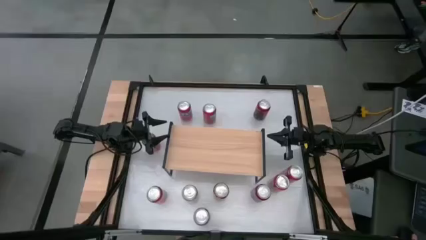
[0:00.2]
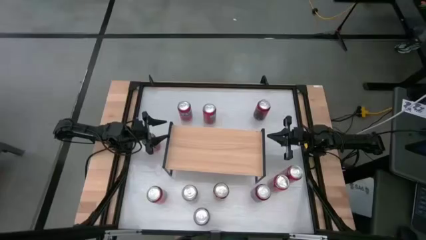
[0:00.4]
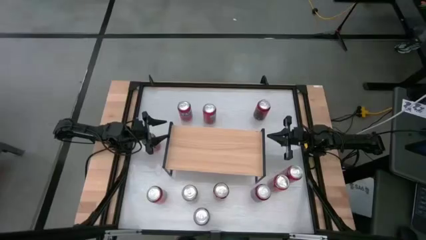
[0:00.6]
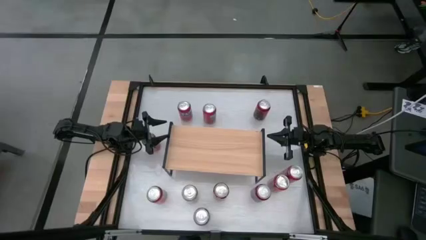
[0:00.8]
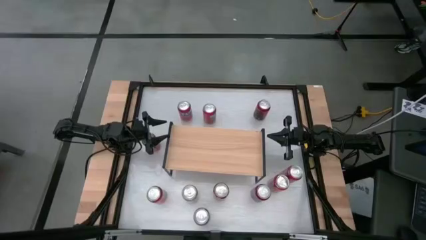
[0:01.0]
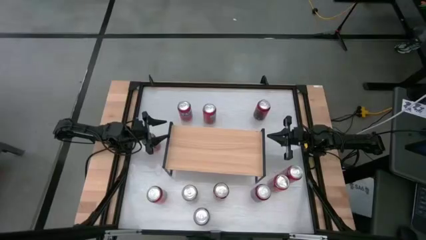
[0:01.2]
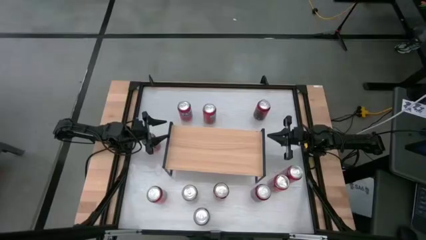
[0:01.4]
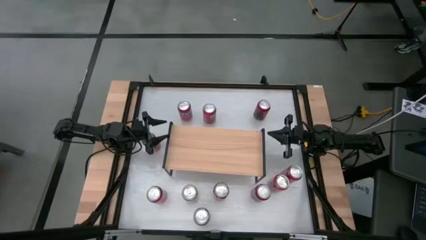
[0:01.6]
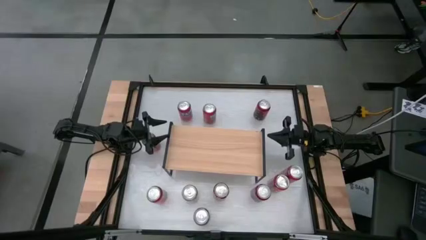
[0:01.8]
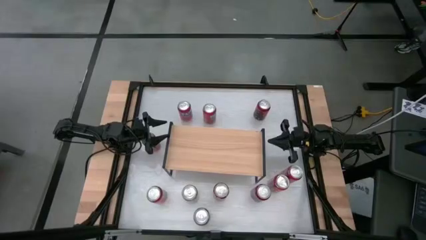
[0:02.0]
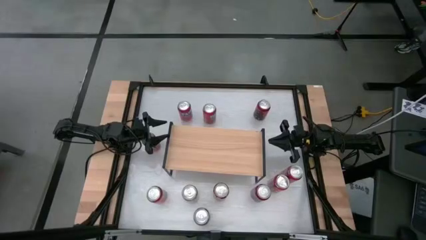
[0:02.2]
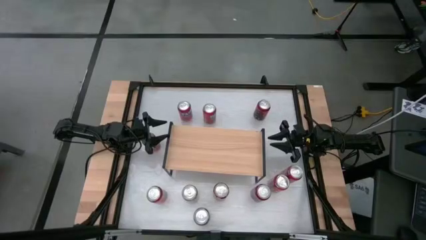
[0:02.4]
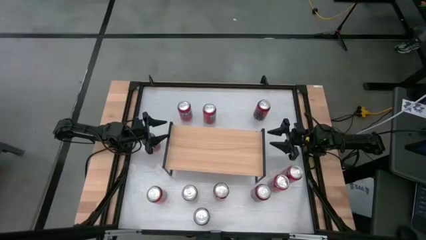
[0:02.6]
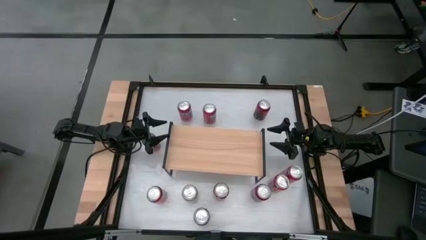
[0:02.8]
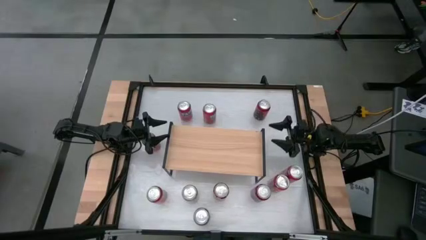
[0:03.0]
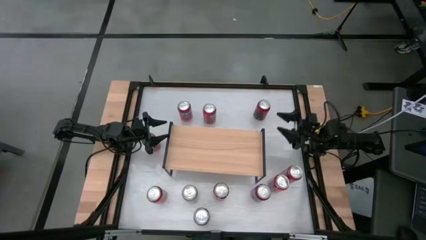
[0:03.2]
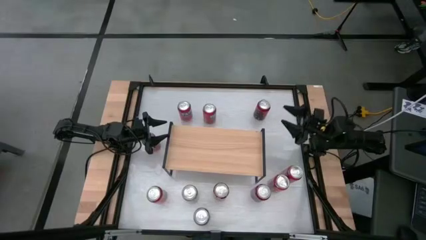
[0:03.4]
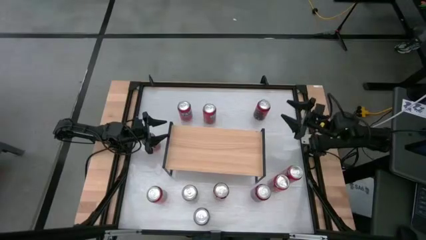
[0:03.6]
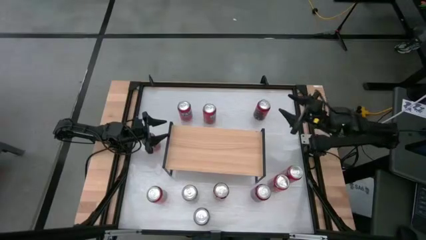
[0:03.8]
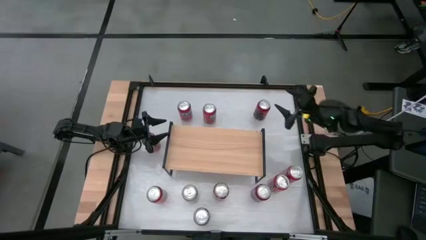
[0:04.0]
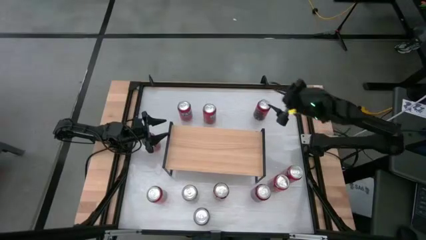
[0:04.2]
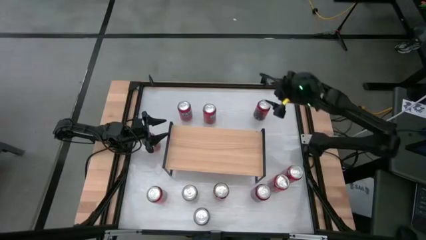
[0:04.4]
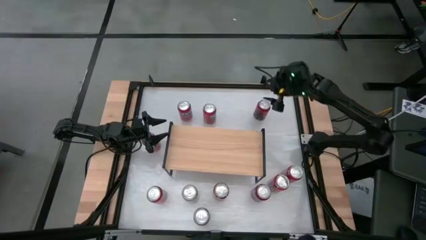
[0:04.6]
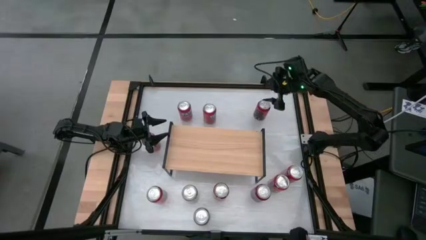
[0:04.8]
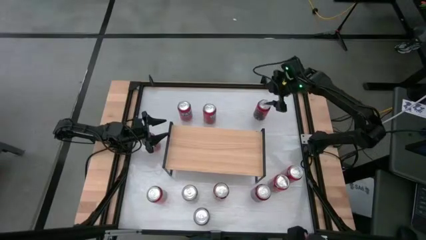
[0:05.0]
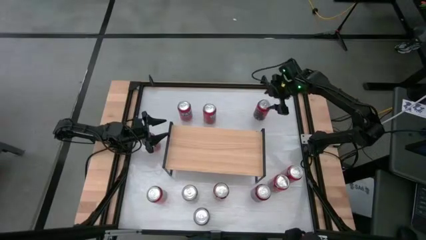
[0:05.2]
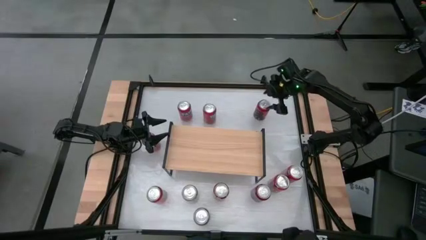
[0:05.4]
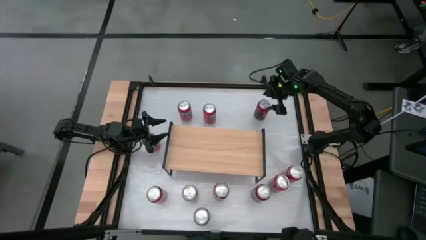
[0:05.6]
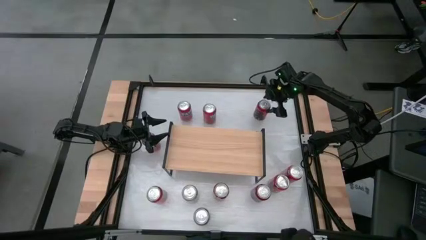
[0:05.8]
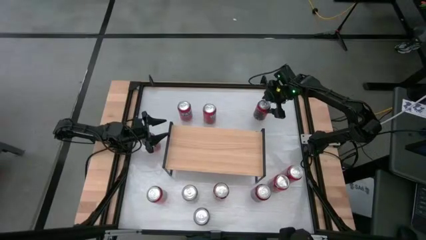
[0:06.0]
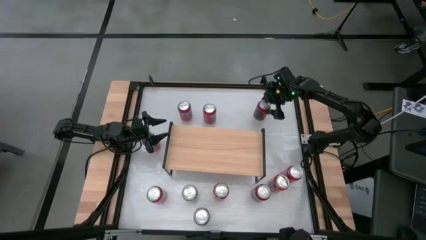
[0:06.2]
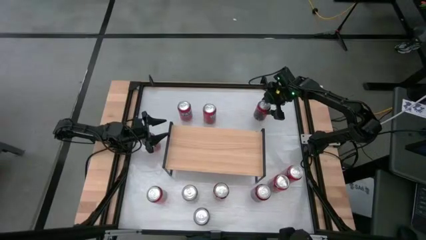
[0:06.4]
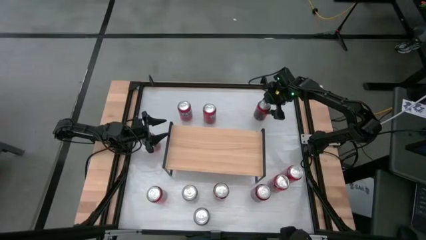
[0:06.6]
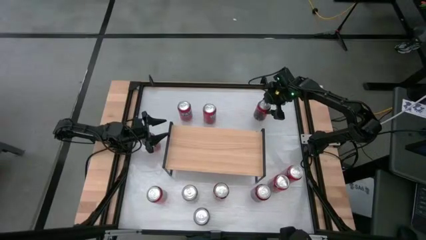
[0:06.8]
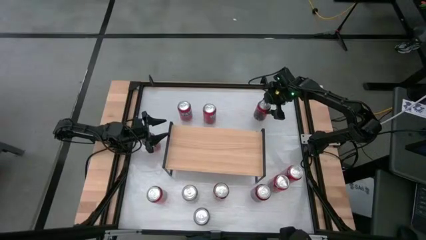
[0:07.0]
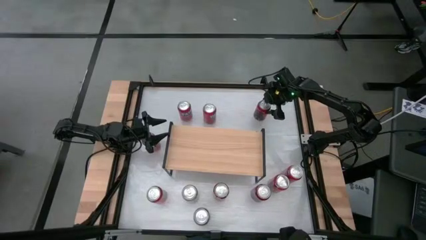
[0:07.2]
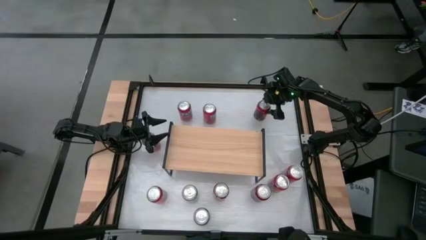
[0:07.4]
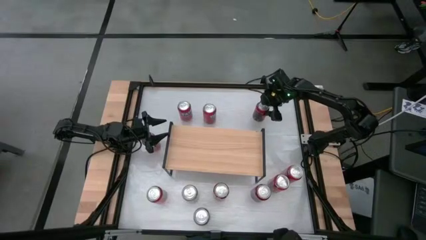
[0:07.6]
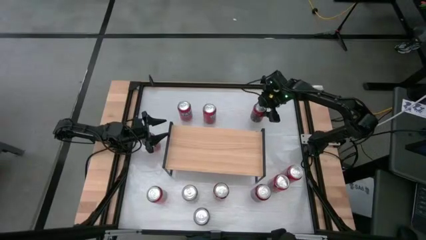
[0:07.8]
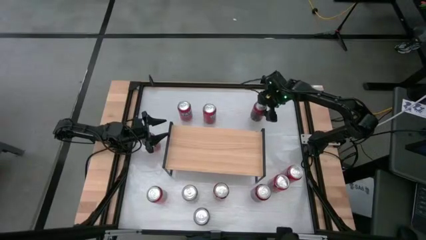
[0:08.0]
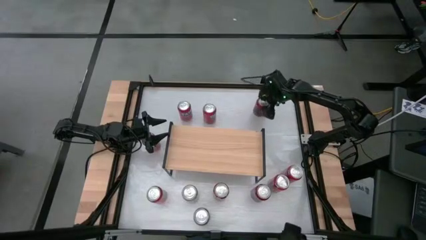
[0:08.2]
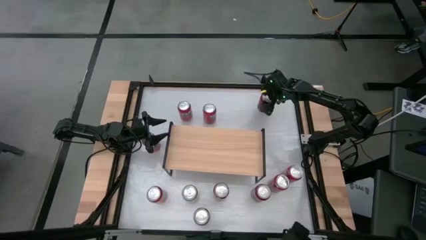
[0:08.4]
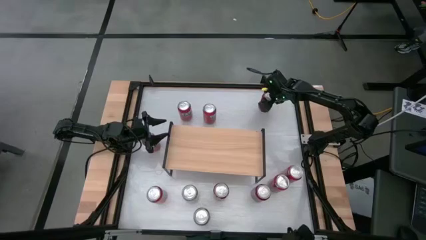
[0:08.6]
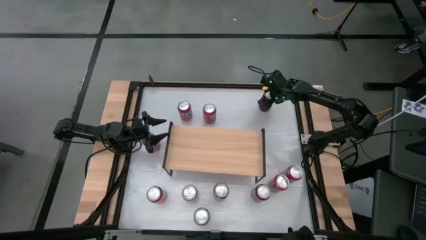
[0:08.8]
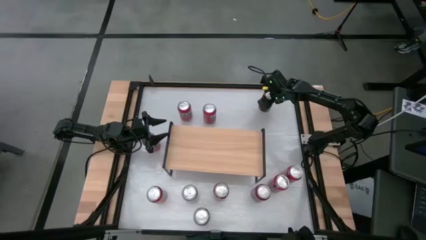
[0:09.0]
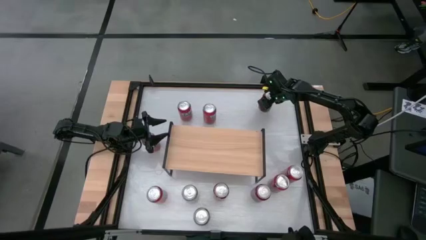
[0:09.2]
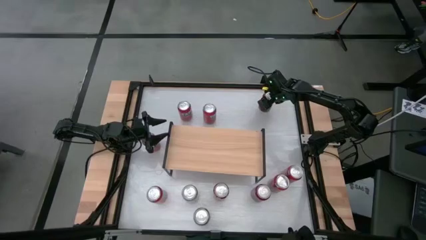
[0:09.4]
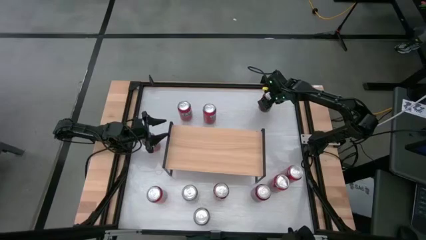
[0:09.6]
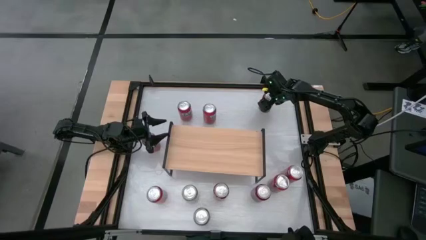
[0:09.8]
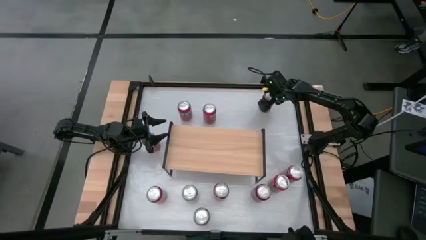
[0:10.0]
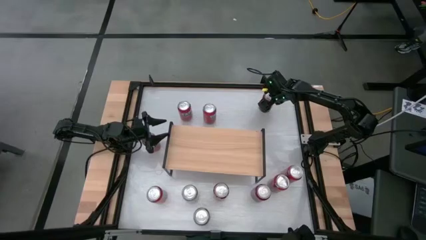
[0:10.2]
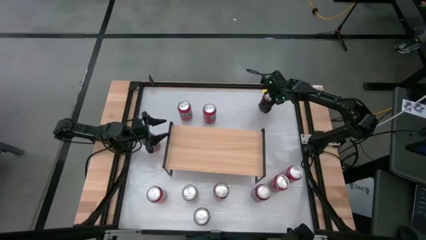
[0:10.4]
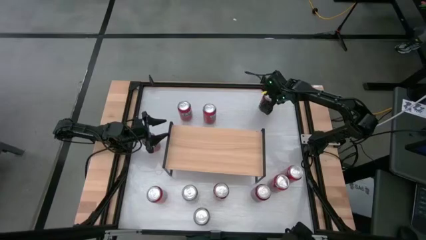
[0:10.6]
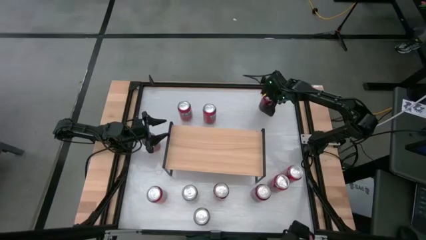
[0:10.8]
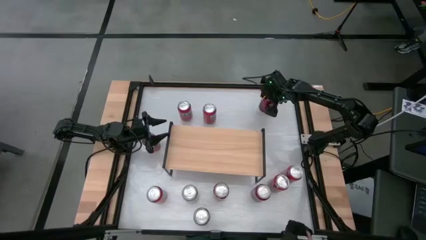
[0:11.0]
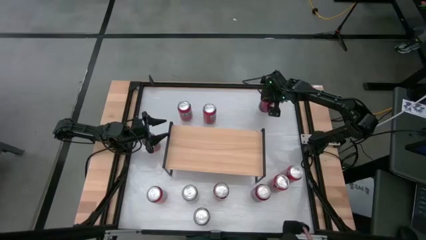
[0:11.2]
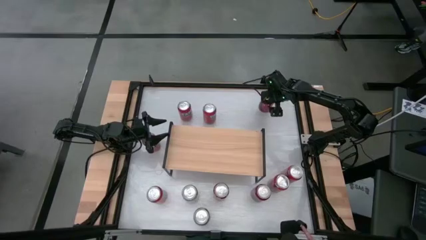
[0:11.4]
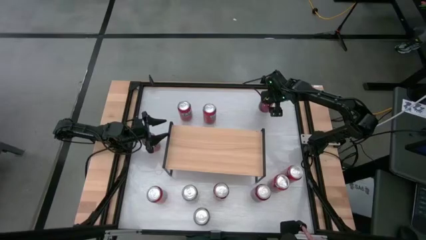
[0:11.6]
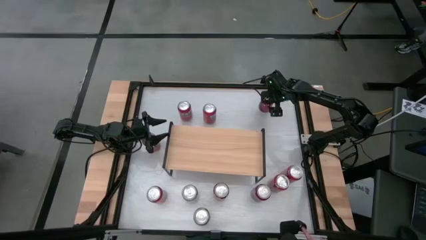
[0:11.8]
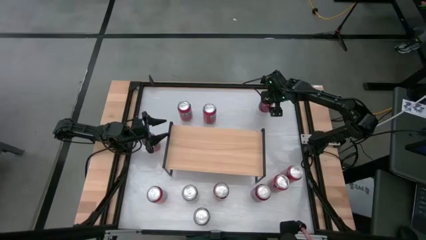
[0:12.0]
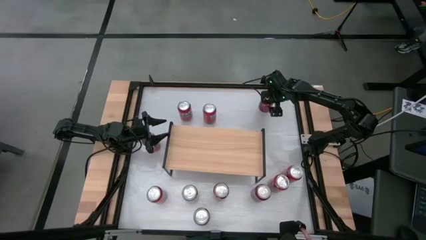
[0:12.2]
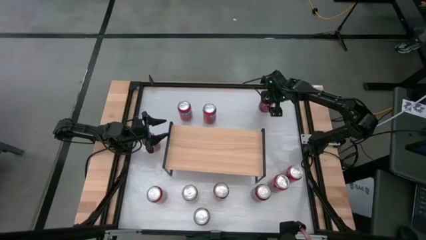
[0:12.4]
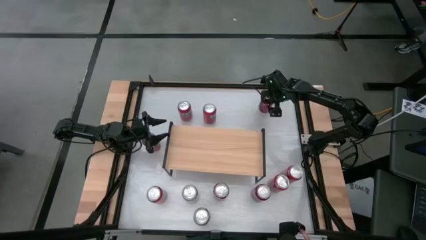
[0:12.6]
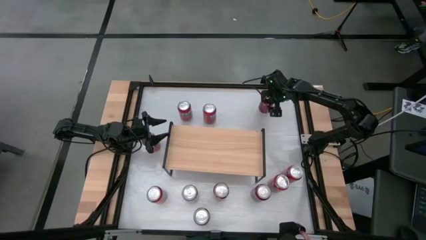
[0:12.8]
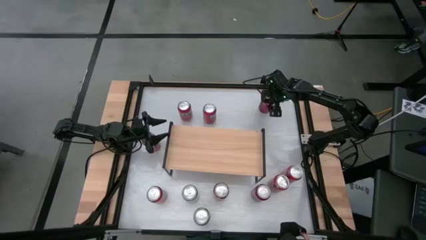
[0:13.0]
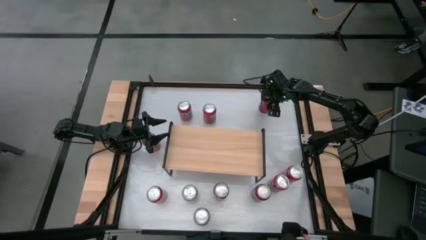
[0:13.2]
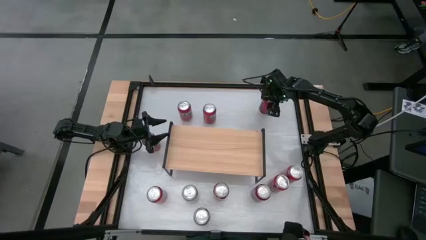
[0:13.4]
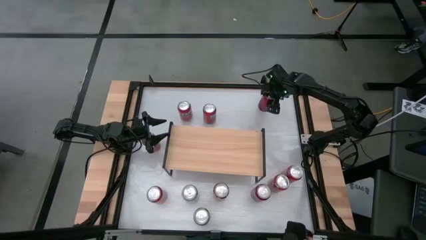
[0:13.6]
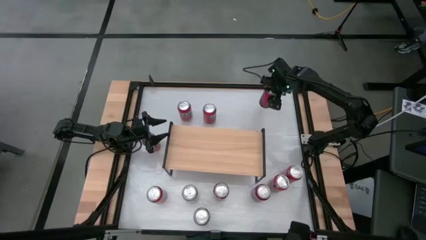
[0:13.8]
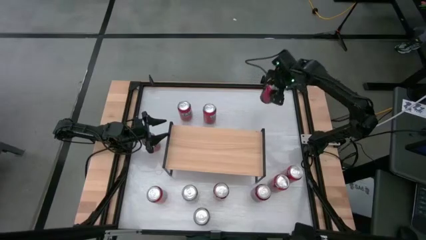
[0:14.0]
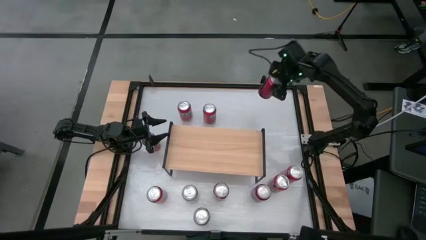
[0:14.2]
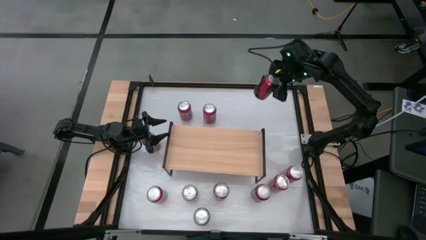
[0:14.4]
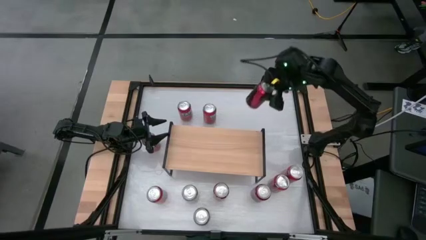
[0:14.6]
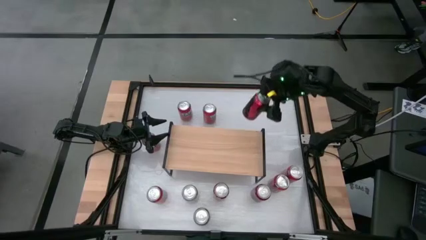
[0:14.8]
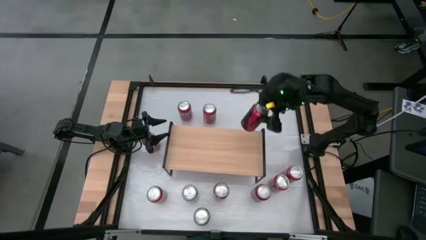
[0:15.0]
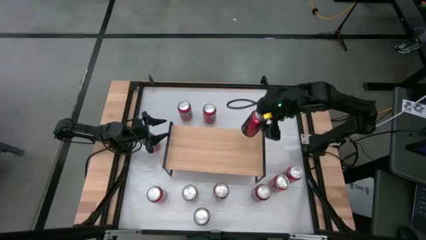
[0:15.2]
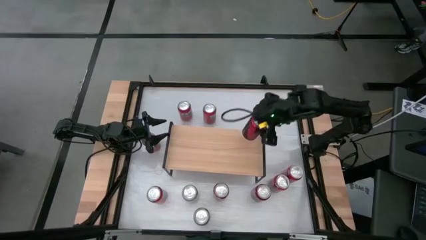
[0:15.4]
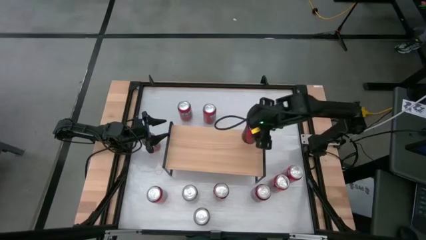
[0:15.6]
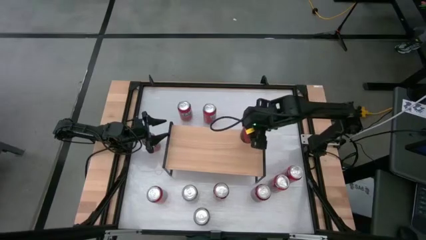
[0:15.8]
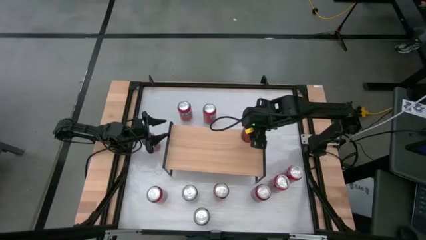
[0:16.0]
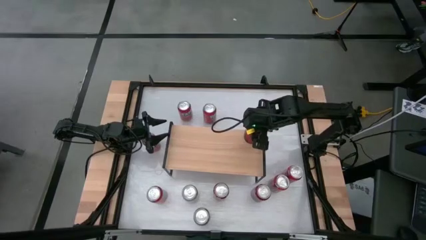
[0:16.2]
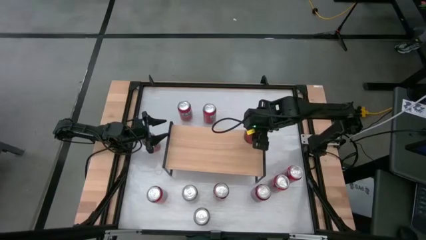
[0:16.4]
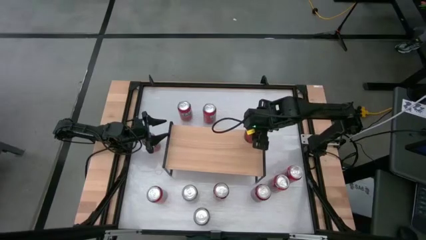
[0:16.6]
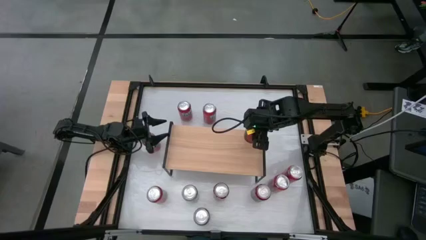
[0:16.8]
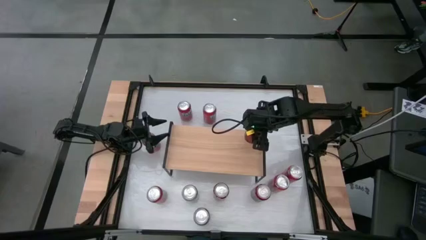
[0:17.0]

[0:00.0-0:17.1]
Task: Place canned beverage on shelf
Put the red black soda can on the shelf
